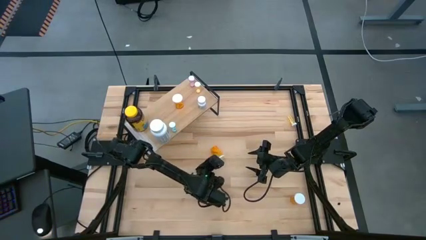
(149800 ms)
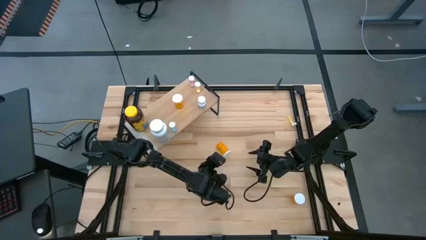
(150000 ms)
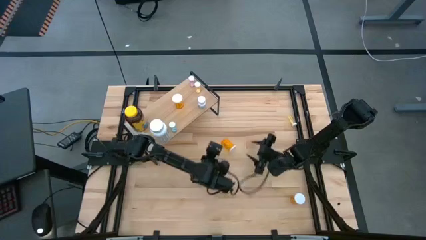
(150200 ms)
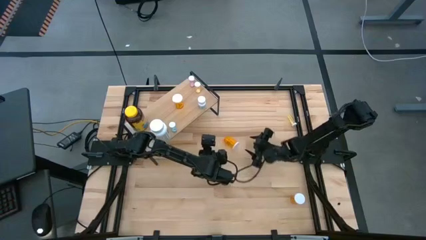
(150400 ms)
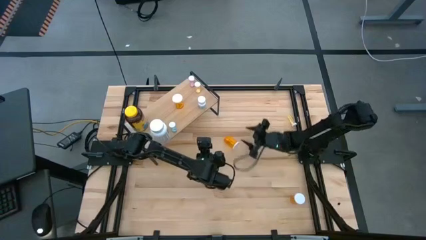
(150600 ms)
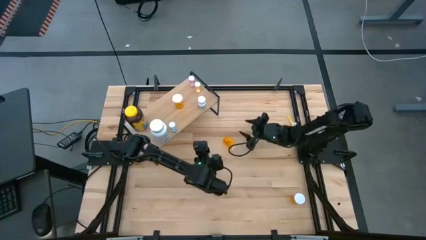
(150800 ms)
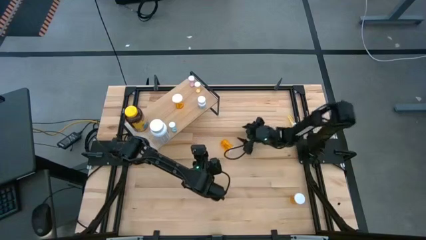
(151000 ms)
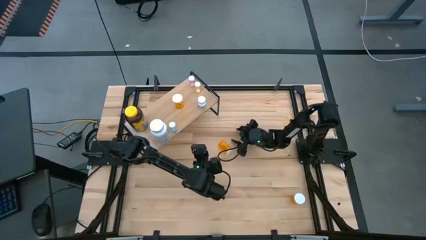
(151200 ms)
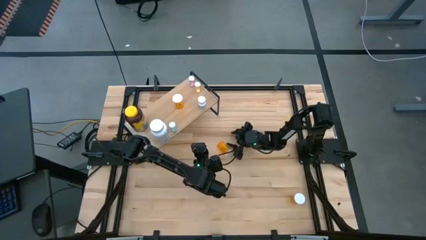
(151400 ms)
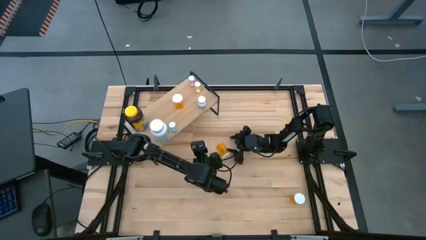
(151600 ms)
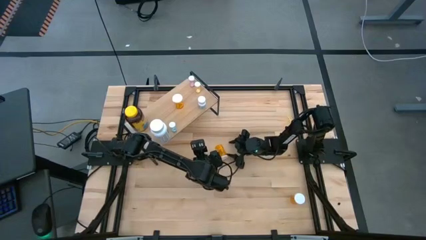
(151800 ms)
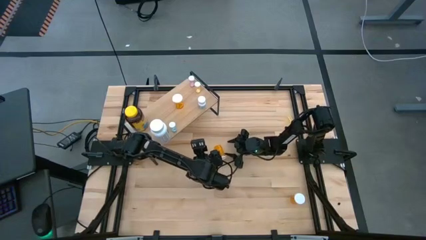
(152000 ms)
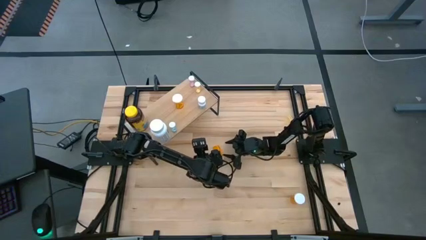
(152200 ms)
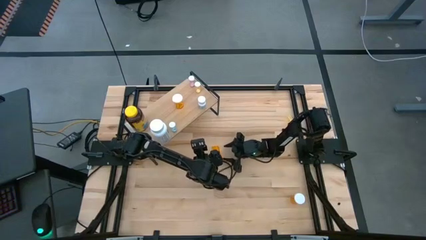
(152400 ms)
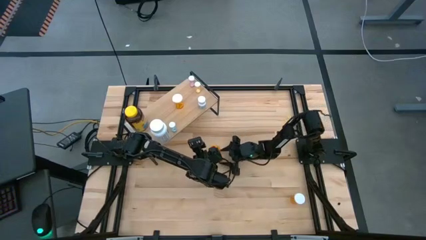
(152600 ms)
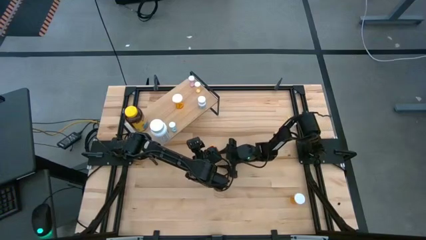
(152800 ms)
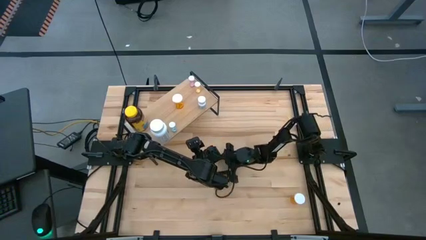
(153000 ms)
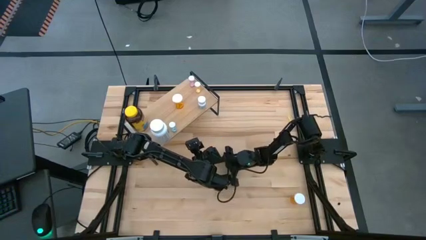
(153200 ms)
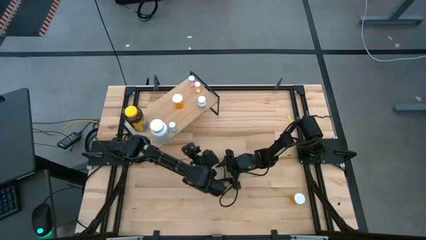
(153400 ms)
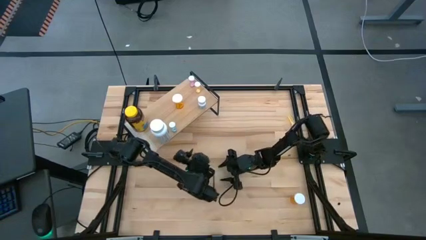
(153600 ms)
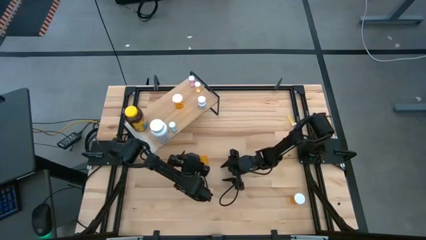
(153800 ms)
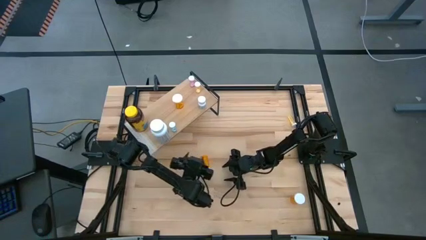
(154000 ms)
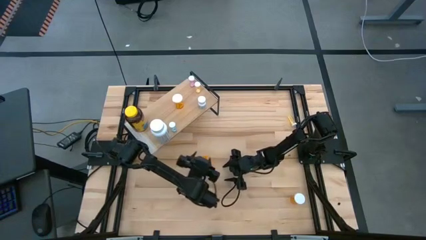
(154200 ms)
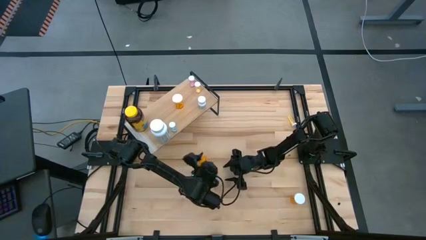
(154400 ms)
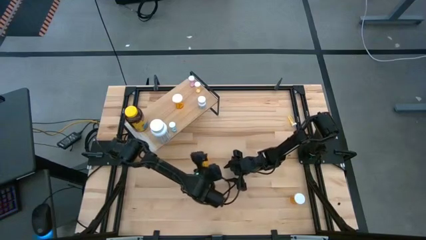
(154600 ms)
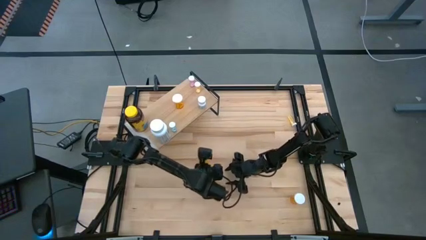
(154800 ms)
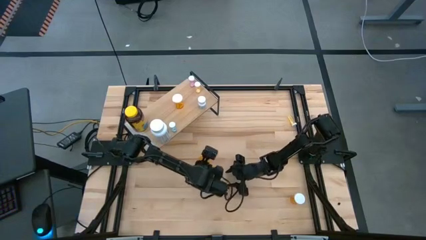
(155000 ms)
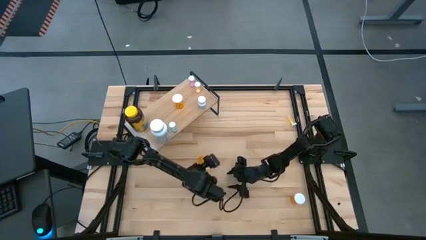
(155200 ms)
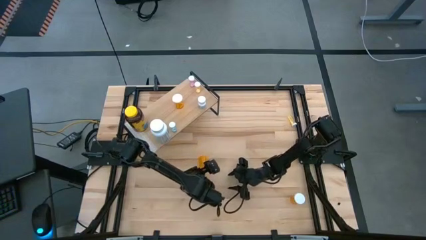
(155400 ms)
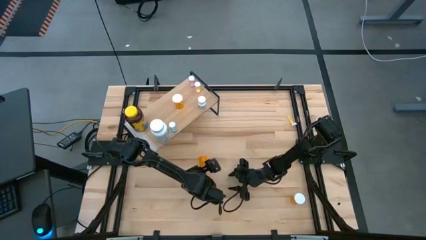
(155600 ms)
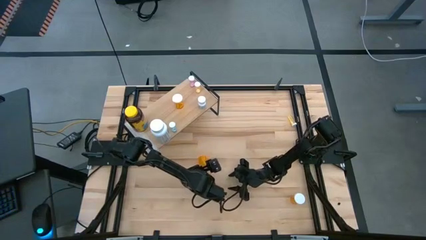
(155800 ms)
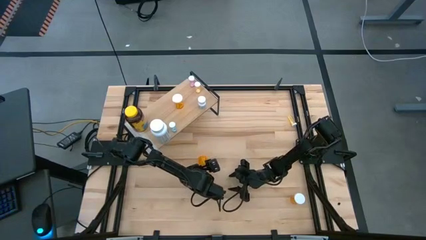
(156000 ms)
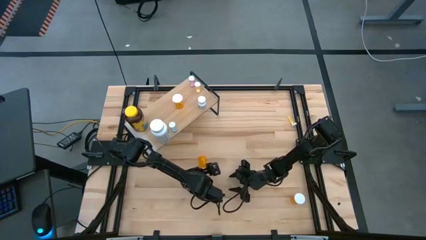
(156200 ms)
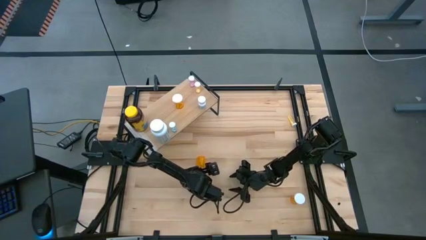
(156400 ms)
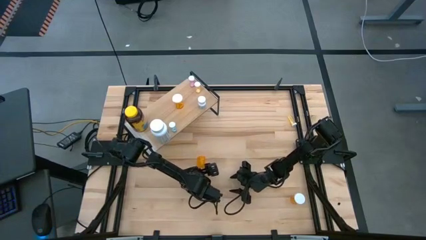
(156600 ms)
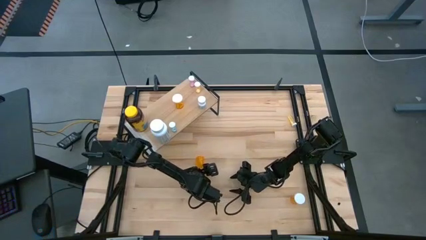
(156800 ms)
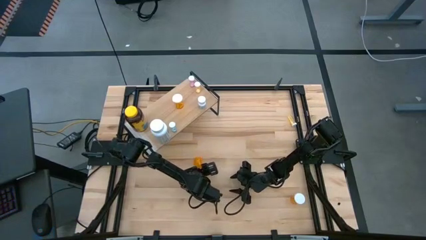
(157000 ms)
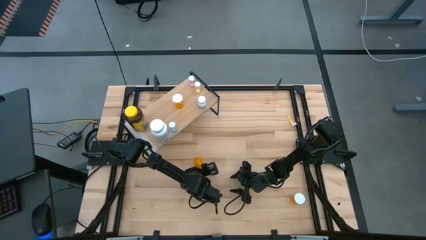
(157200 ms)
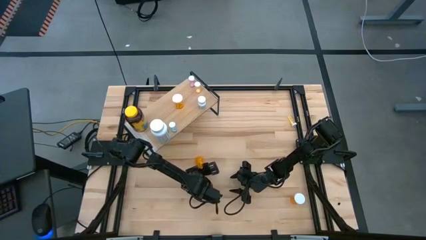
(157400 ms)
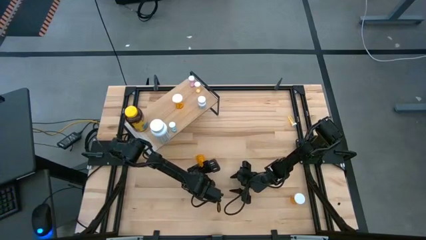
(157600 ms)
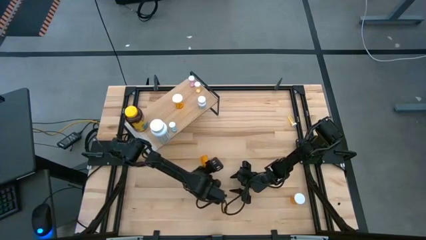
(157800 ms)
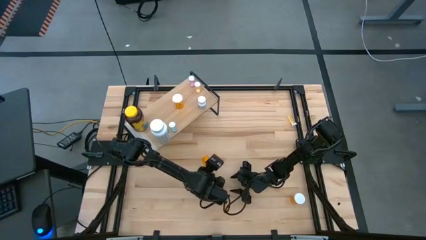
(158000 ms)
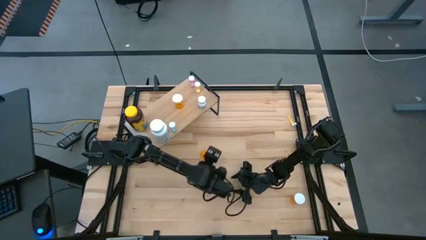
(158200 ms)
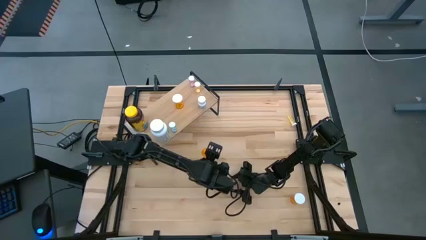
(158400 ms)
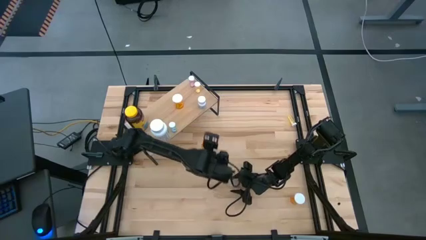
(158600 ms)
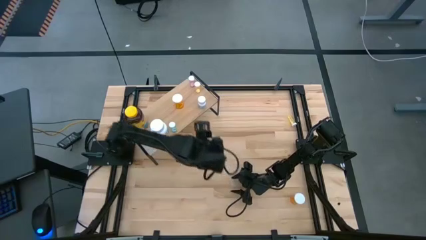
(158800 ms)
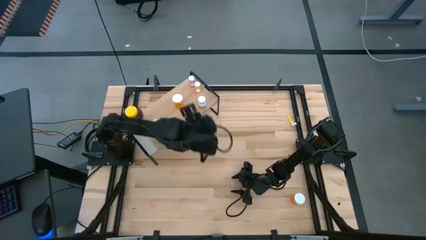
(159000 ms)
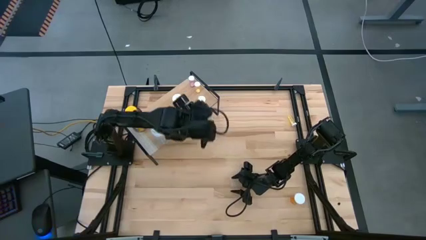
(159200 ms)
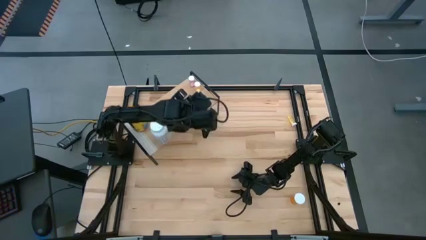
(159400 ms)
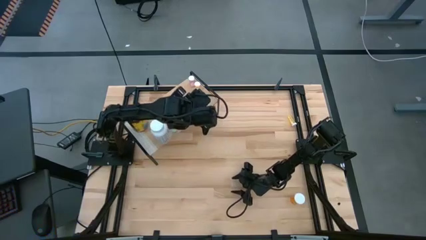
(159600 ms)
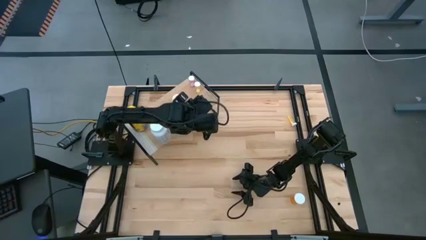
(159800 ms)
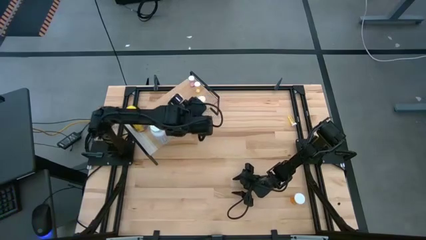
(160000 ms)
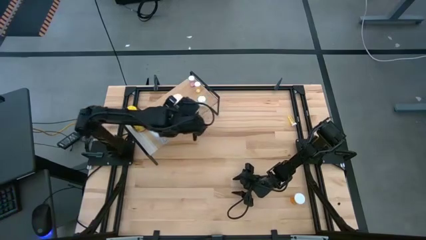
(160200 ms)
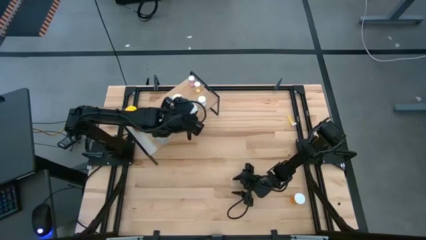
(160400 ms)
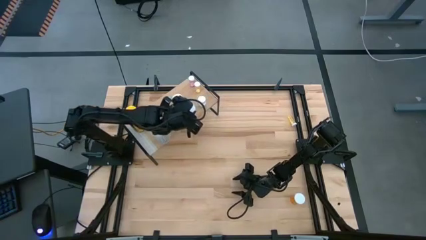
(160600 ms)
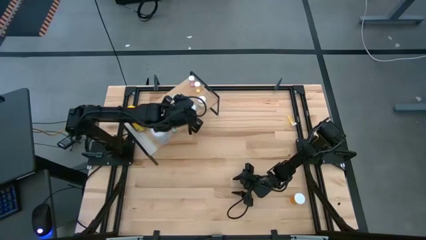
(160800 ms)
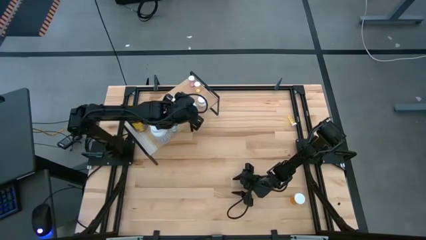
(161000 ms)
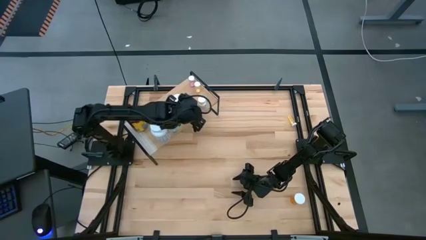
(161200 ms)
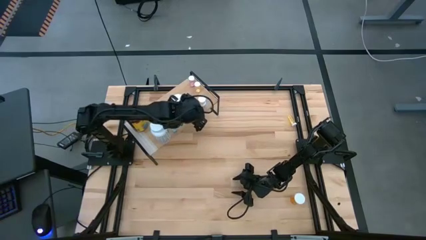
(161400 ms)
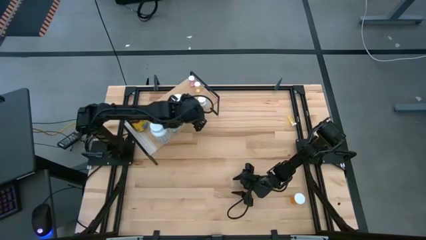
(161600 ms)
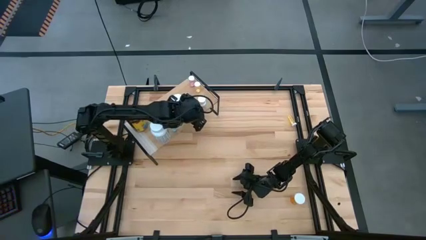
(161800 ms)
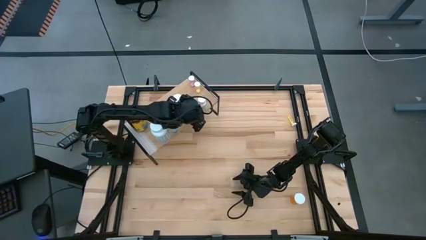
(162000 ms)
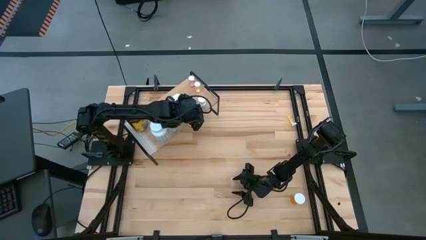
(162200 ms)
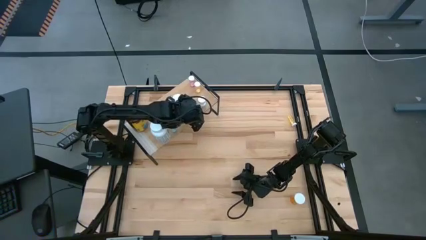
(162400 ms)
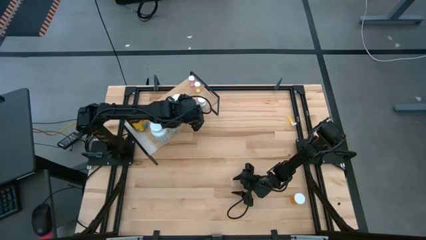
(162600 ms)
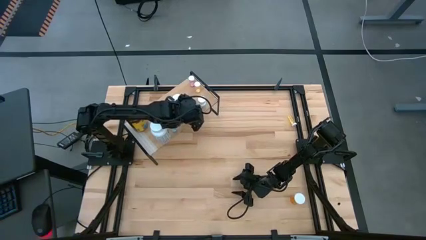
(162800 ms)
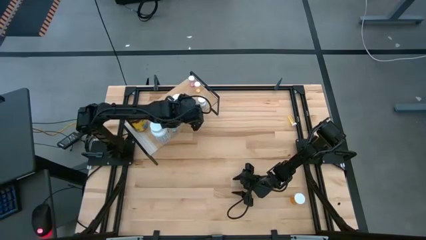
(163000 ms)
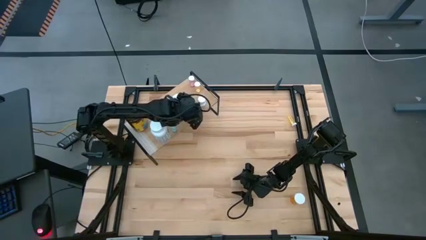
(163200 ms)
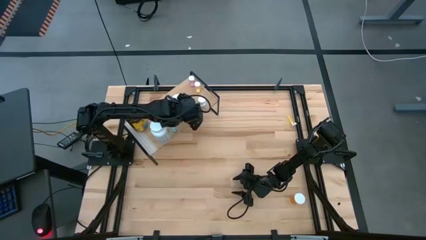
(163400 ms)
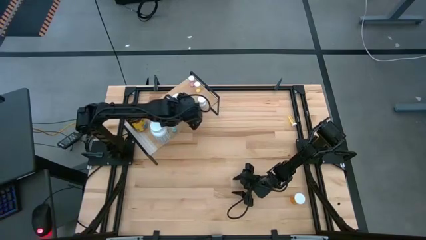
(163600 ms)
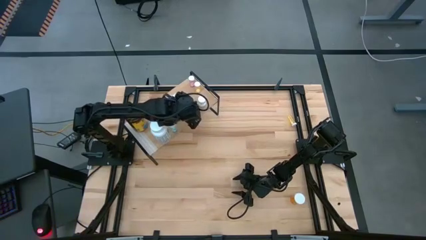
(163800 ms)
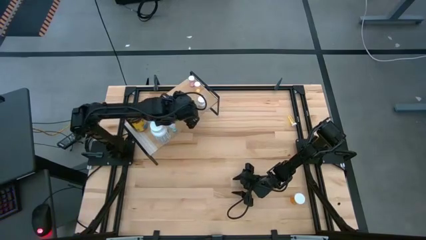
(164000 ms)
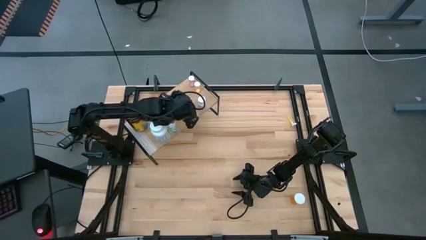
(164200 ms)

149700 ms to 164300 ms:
Task: Pick and place medicine bottles onto shelf by color
Put the top orange pill bottle on the shelf
